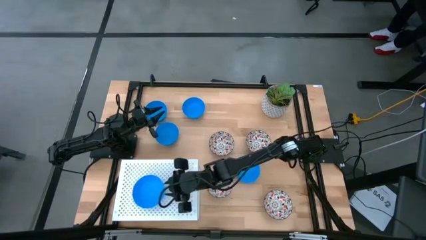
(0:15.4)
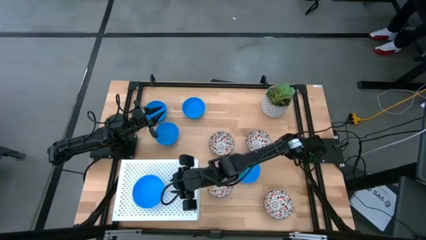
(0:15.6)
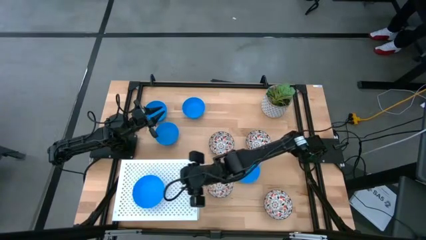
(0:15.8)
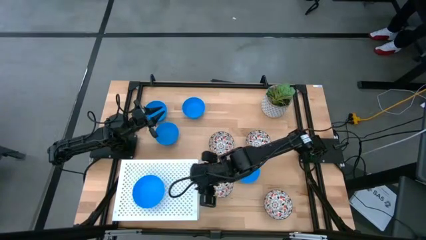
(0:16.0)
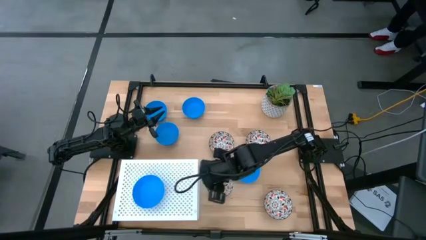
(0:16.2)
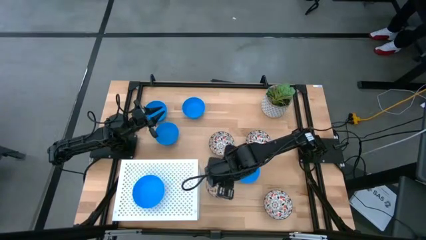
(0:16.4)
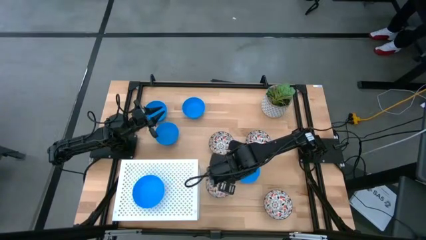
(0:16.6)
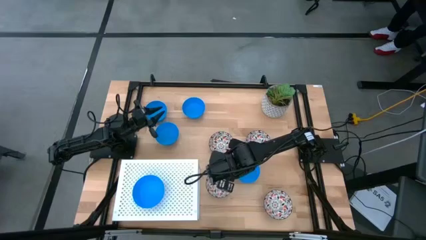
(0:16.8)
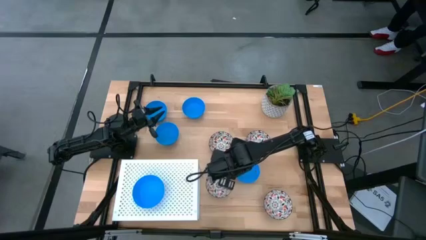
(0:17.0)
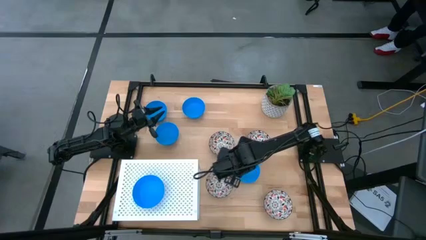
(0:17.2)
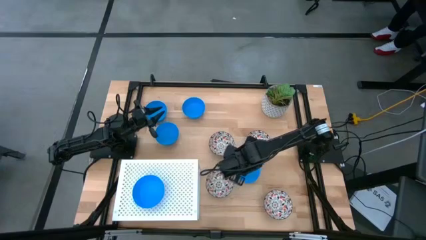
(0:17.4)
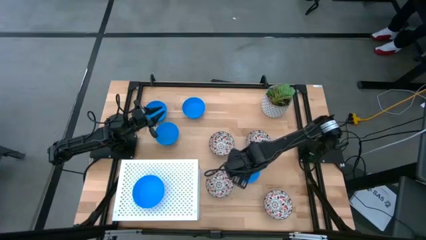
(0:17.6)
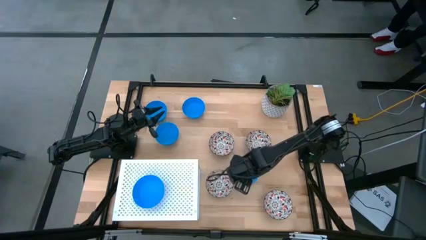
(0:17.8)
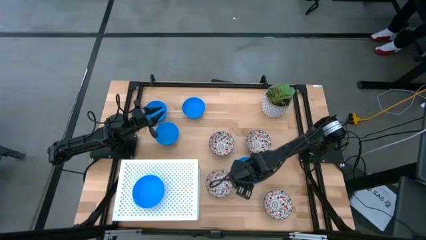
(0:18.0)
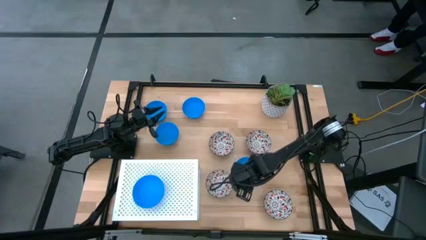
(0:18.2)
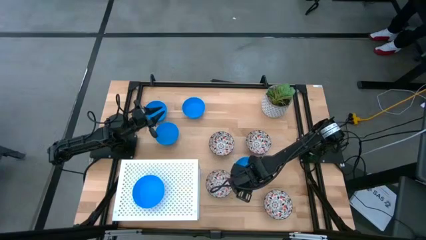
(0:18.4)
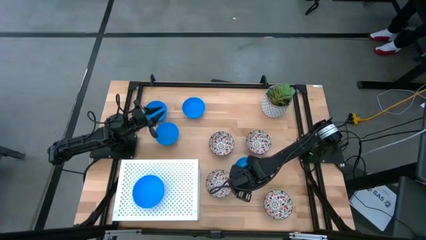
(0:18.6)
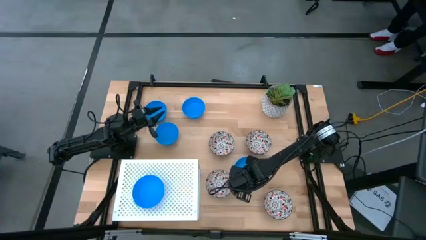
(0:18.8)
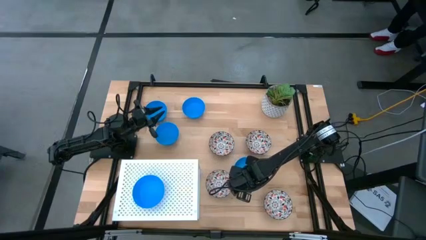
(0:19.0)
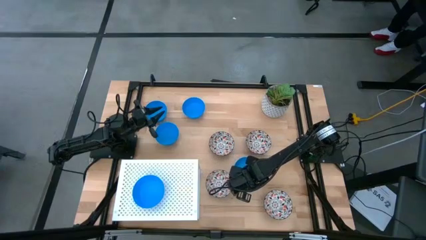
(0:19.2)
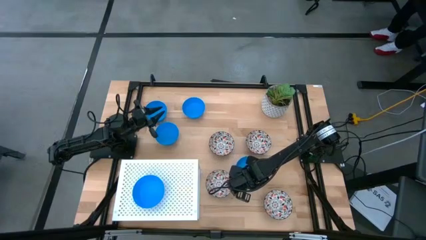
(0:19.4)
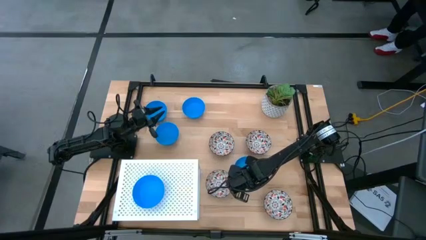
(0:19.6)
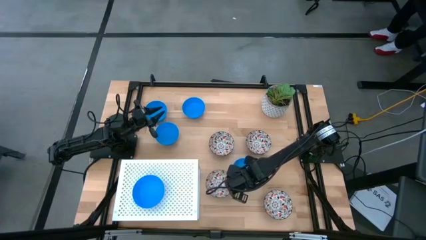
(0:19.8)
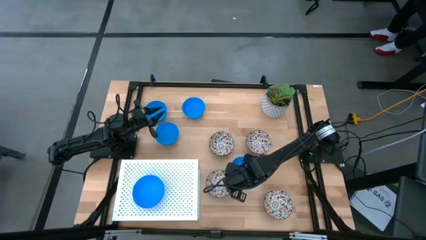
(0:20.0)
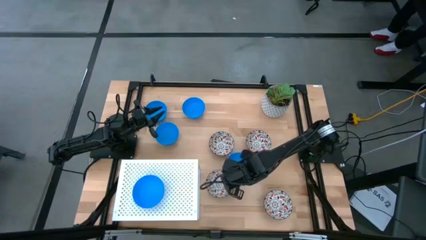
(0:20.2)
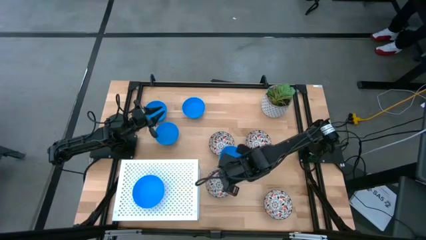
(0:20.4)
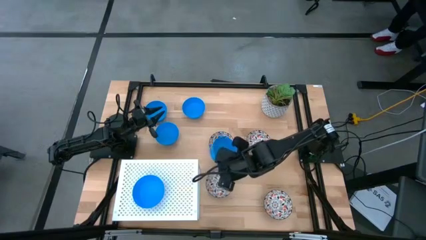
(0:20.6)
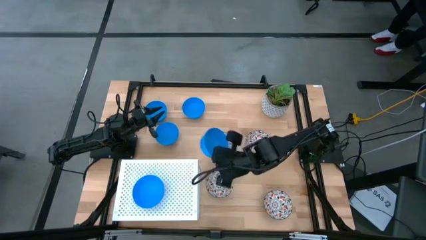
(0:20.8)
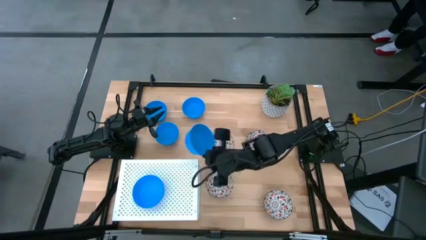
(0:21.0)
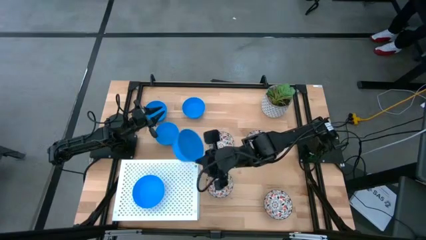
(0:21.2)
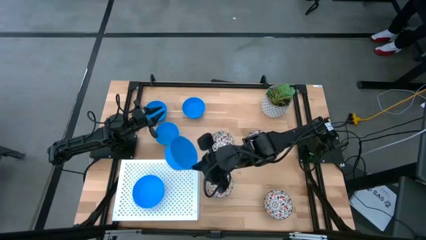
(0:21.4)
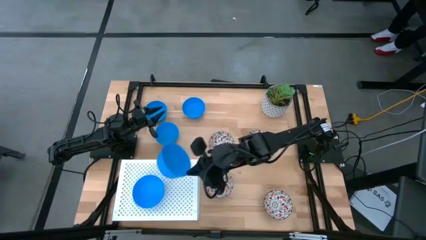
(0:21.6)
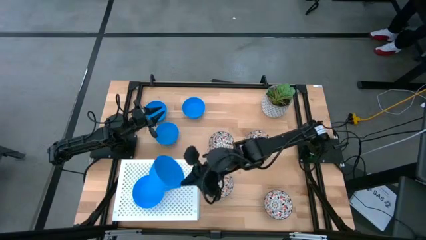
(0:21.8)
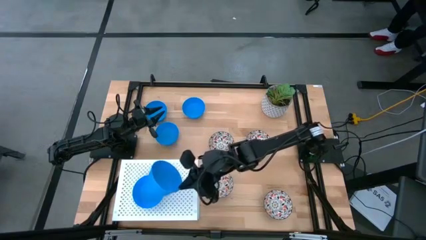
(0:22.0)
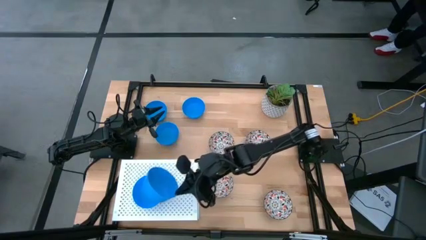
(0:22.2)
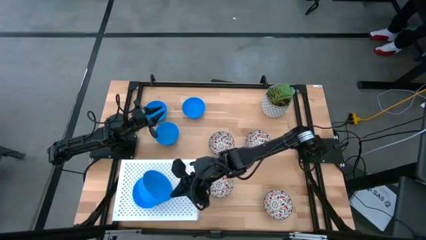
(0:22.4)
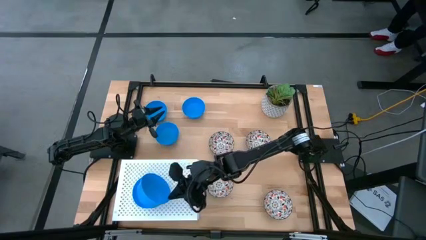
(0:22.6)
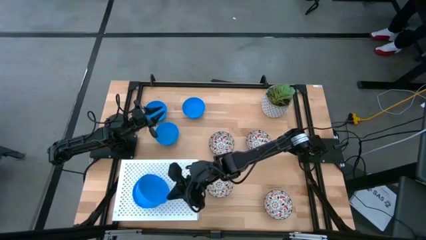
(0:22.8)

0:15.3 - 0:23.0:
Task: Pick & Place Mini bowls
Stack the blue bowl on the blue bowl on the shelf

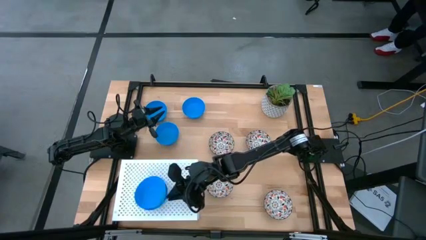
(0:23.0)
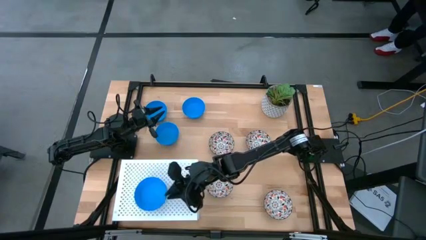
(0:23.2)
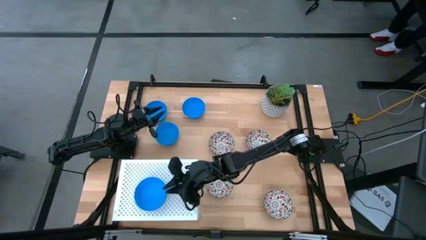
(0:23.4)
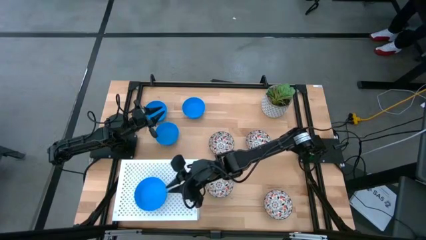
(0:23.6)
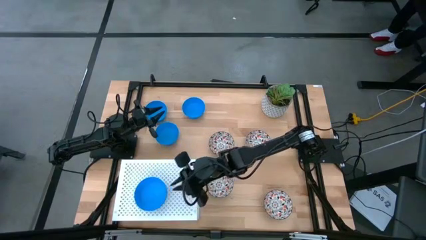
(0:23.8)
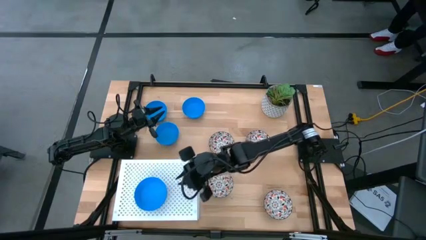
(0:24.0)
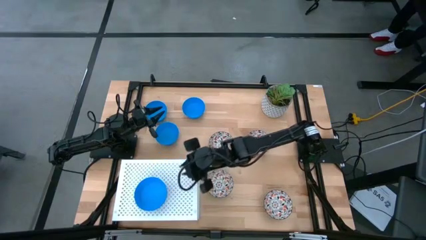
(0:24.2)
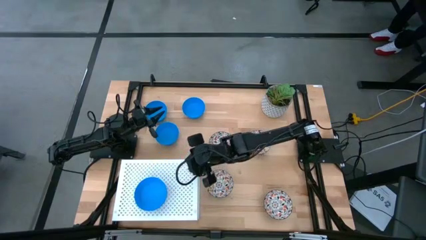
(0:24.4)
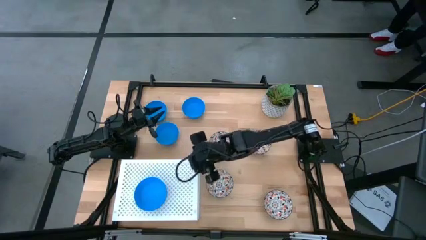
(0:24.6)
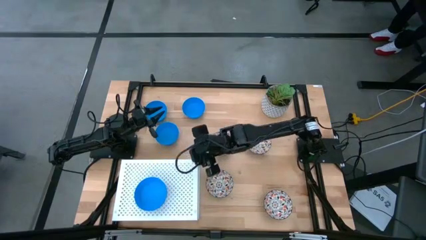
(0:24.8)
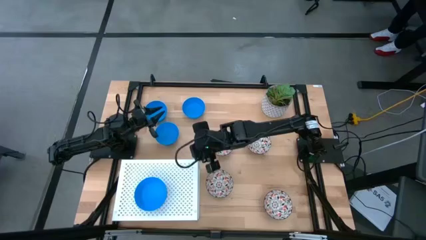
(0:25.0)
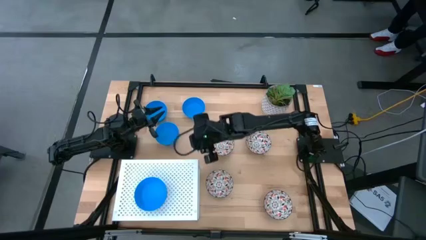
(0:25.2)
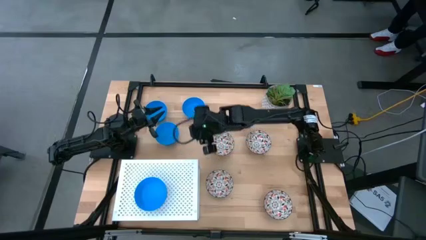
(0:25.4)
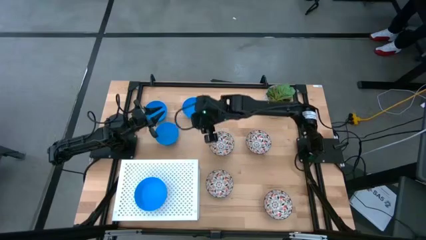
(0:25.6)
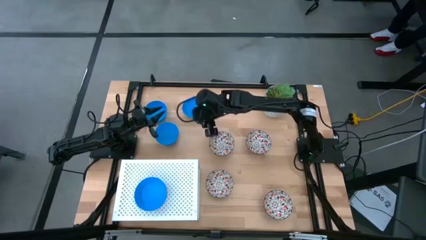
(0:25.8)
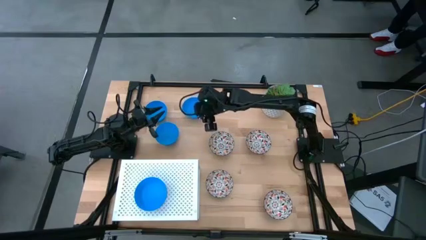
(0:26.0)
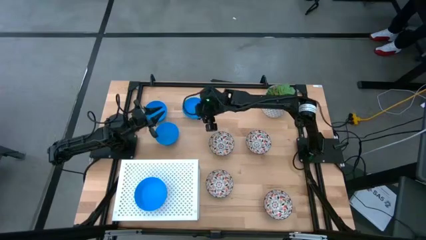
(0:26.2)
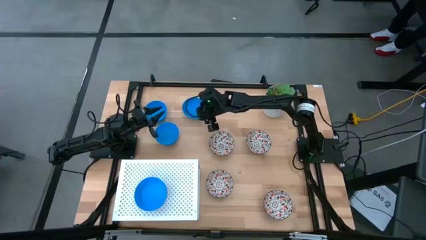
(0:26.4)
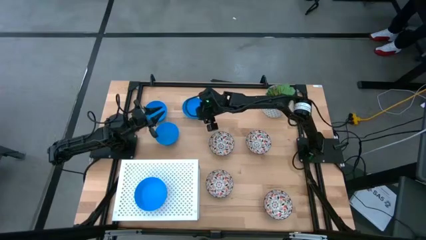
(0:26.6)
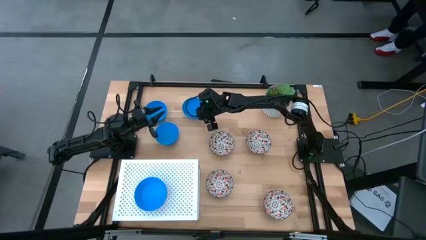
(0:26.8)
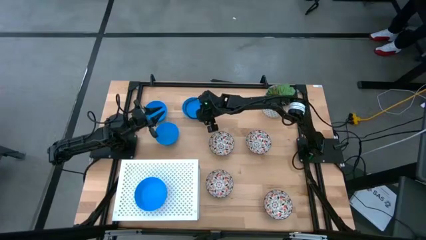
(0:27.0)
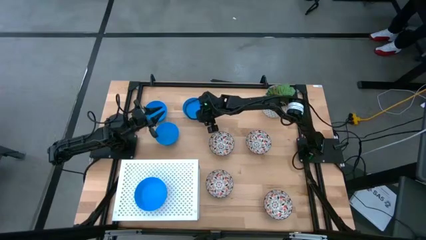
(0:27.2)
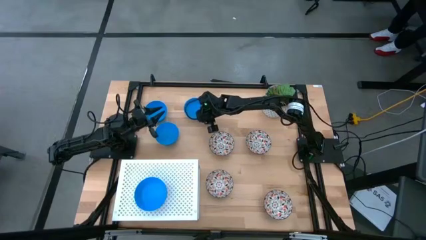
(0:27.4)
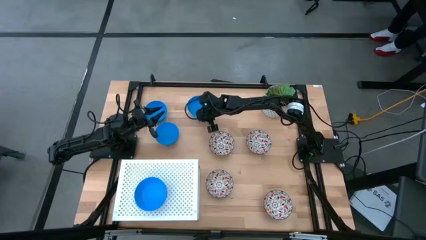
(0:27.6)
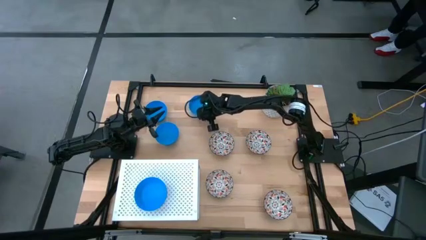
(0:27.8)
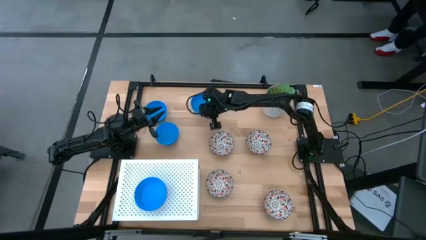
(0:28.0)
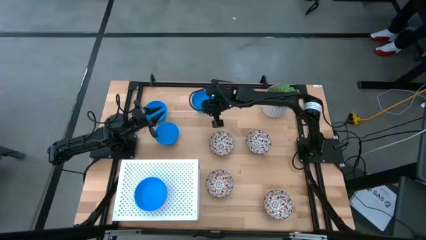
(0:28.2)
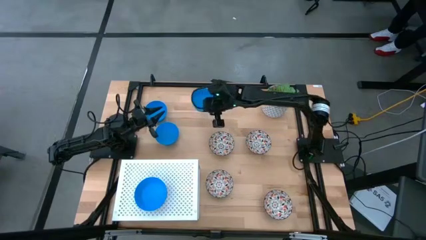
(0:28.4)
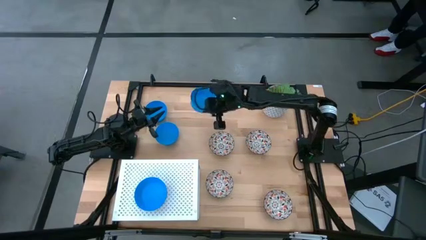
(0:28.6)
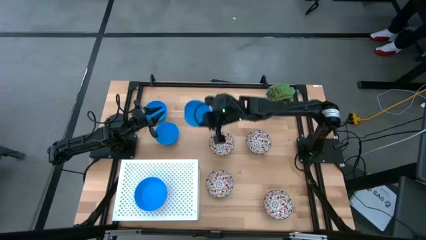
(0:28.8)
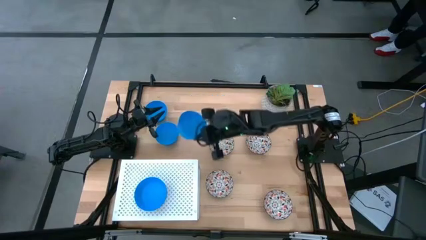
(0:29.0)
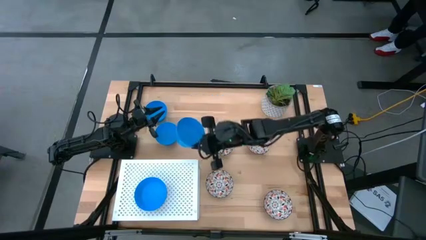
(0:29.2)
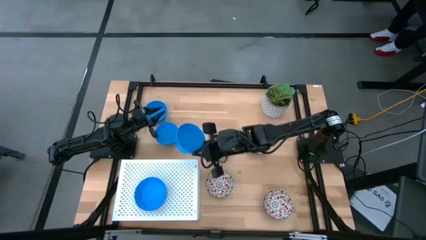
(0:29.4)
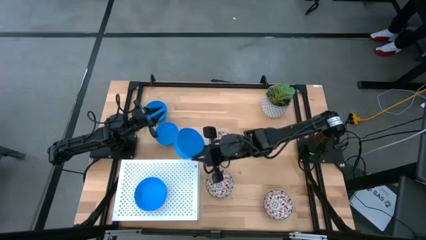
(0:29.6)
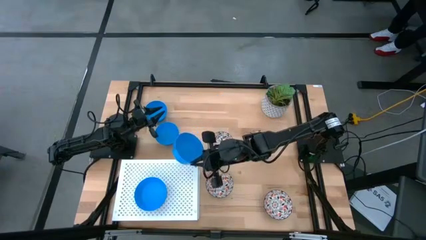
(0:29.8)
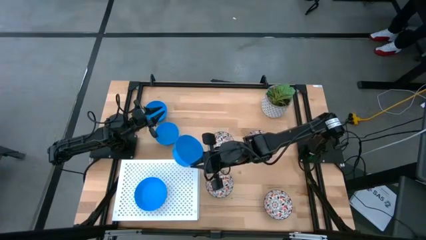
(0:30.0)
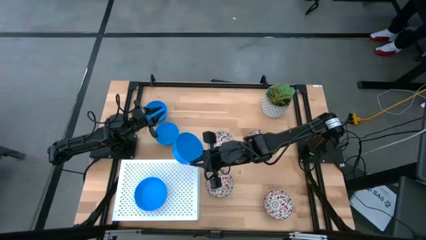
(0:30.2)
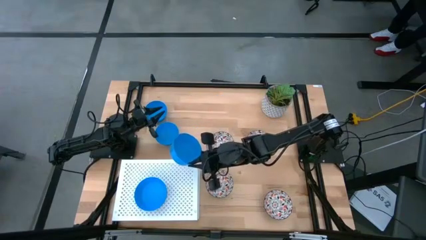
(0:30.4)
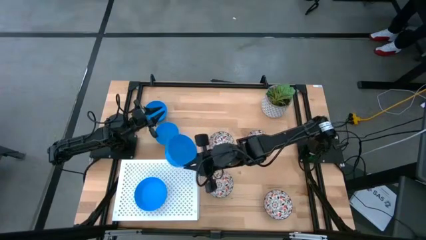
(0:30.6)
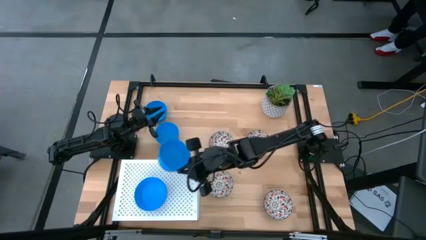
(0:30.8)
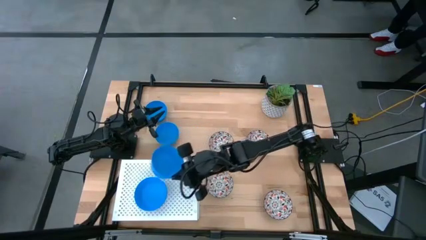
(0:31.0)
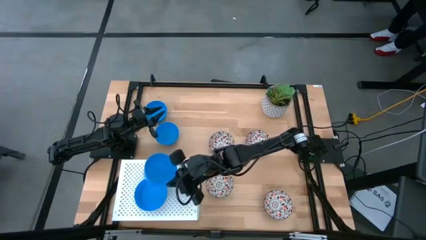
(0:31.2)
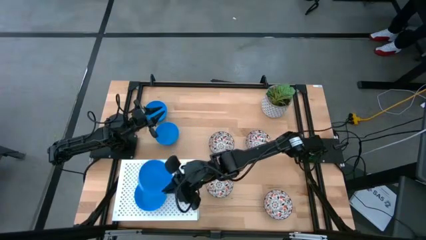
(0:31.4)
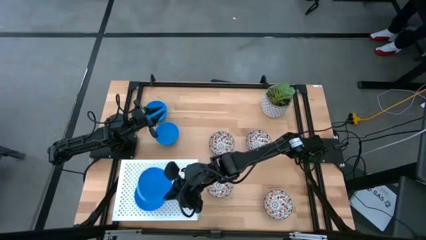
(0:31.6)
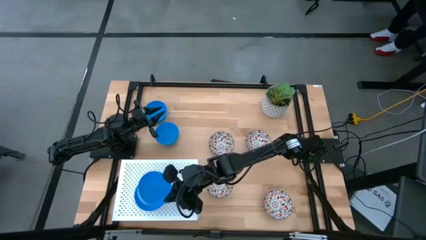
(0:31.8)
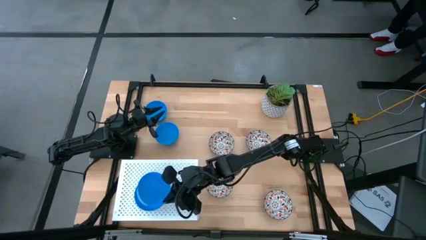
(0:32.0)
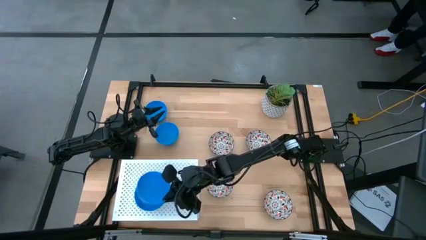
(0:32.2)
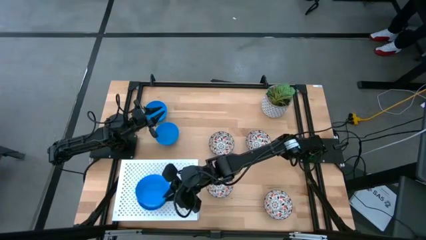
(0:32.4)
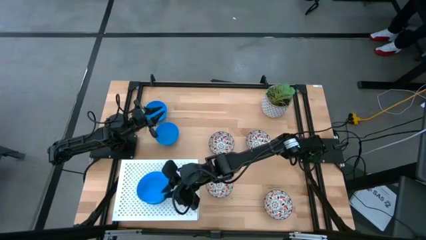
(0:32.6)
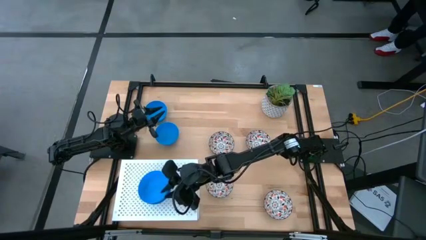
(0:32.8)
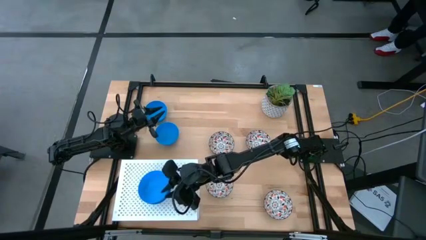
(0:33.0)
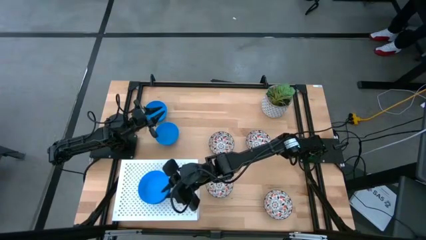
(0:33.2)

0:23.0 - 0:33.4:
Stack the blue bowl on the stacked blue bowls on the shelf
